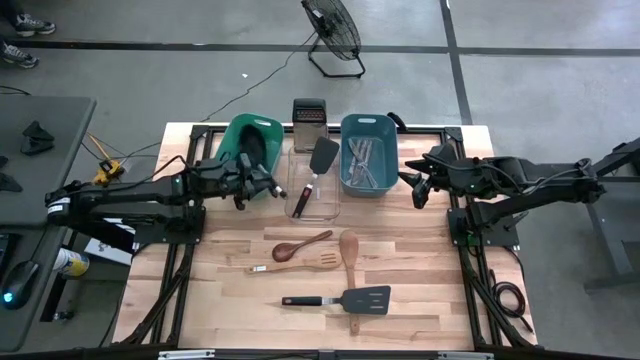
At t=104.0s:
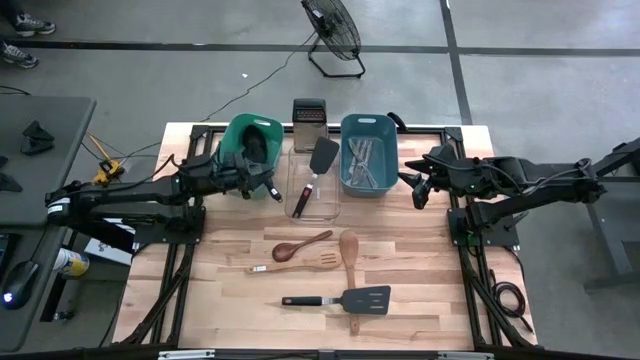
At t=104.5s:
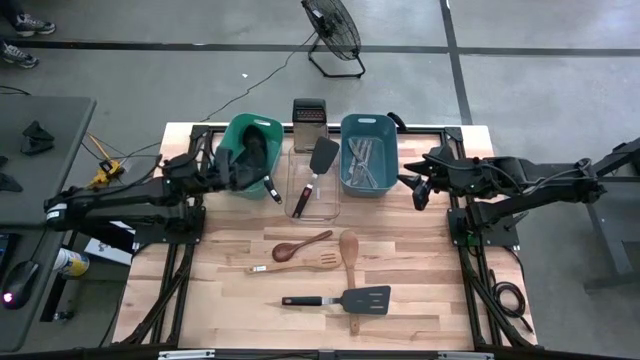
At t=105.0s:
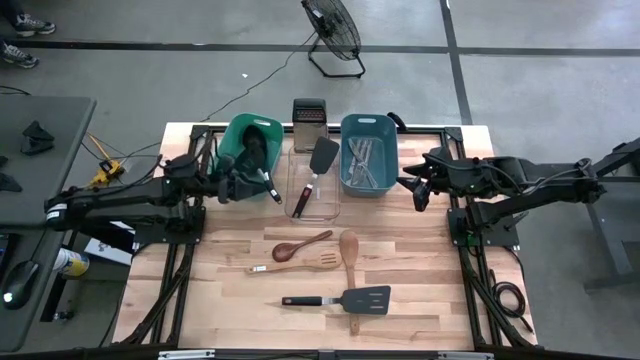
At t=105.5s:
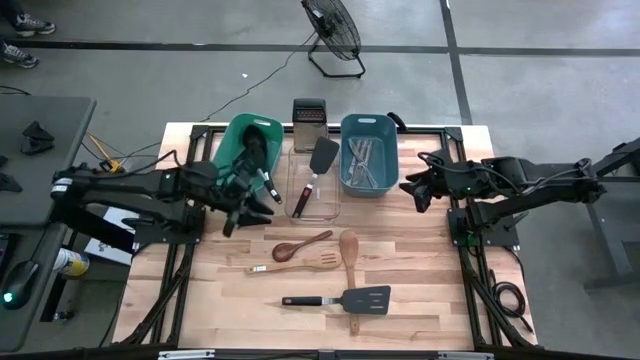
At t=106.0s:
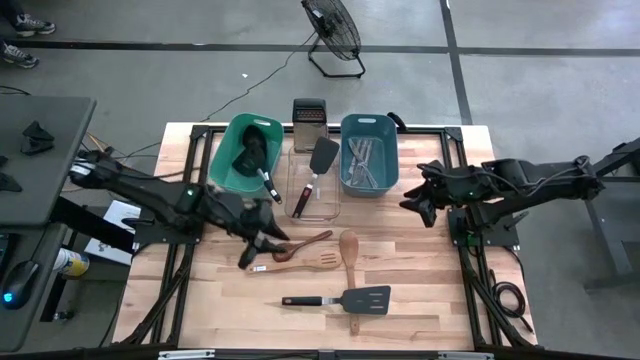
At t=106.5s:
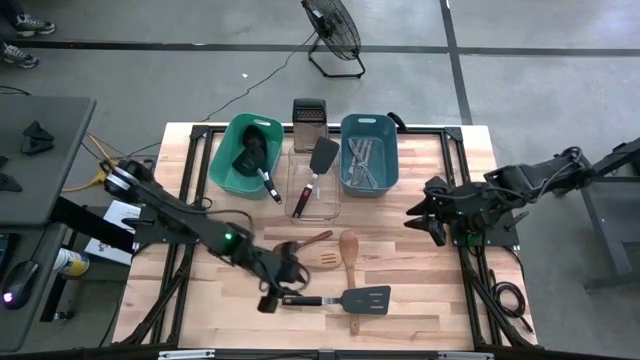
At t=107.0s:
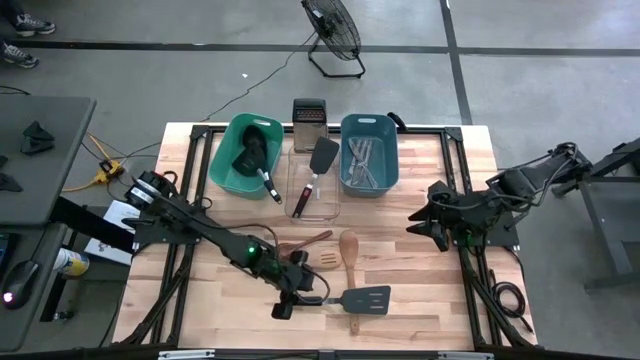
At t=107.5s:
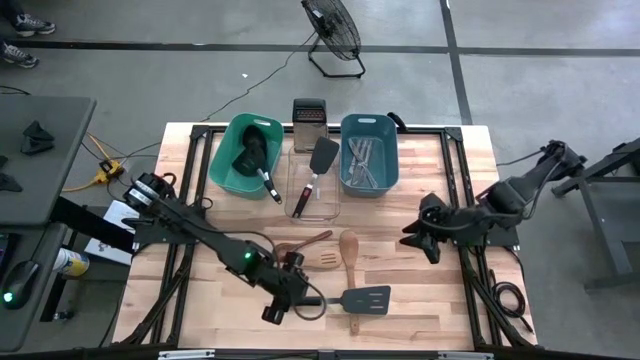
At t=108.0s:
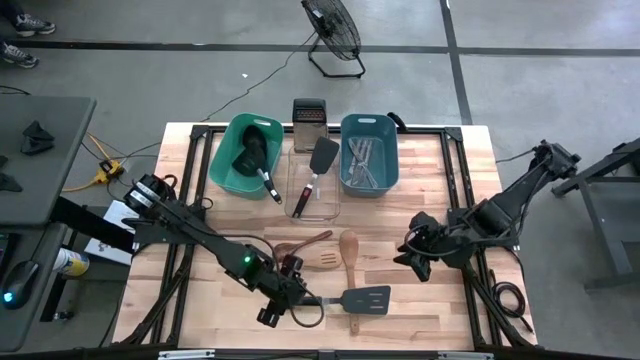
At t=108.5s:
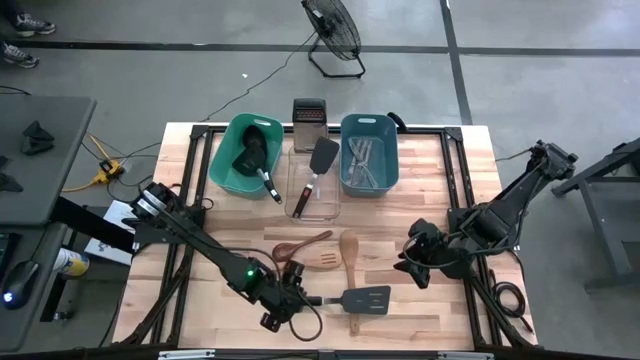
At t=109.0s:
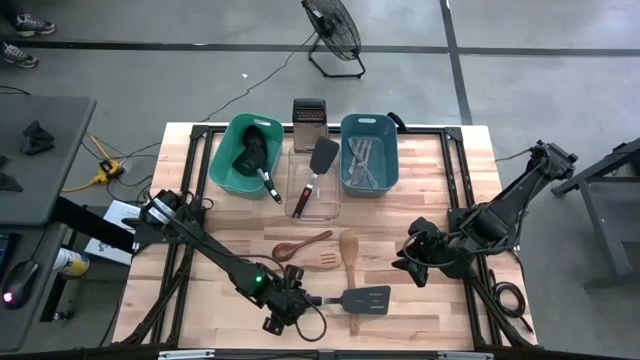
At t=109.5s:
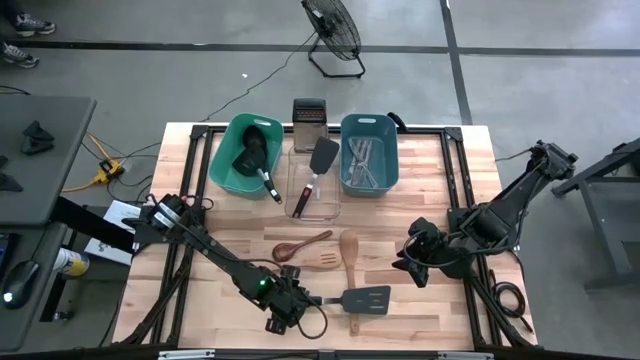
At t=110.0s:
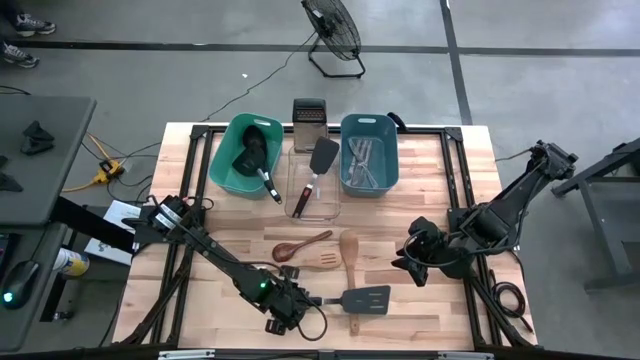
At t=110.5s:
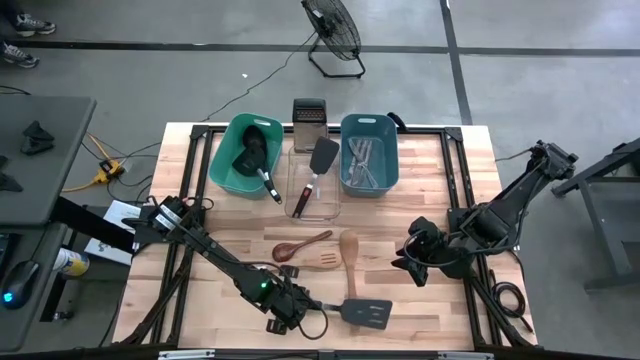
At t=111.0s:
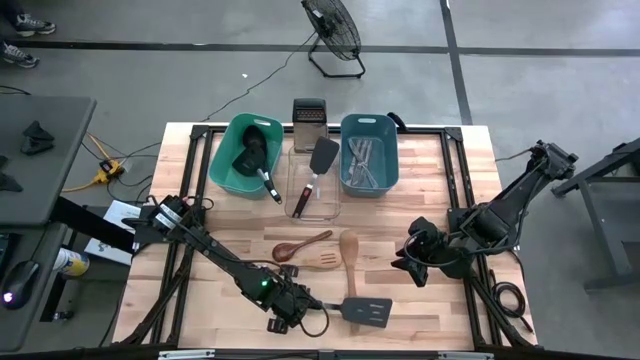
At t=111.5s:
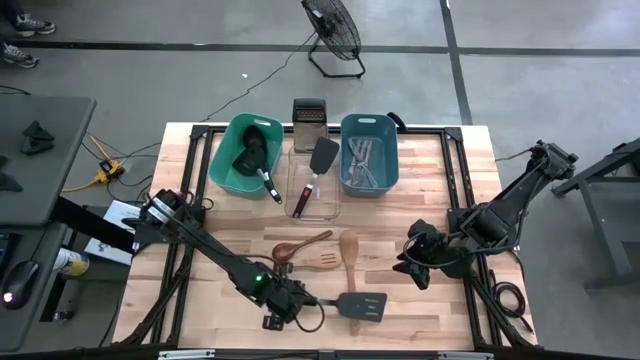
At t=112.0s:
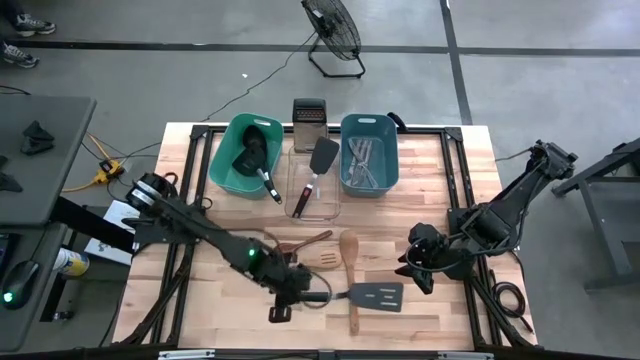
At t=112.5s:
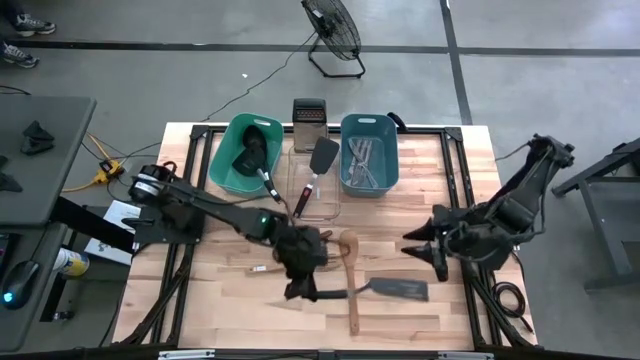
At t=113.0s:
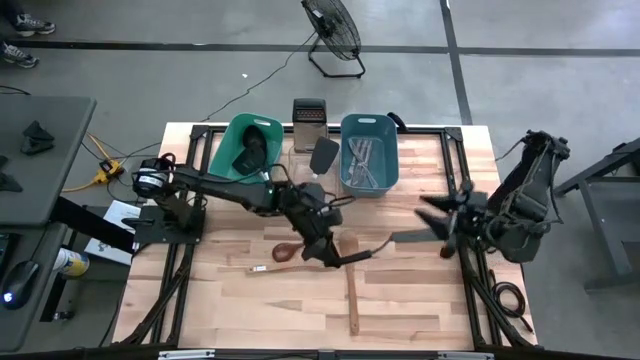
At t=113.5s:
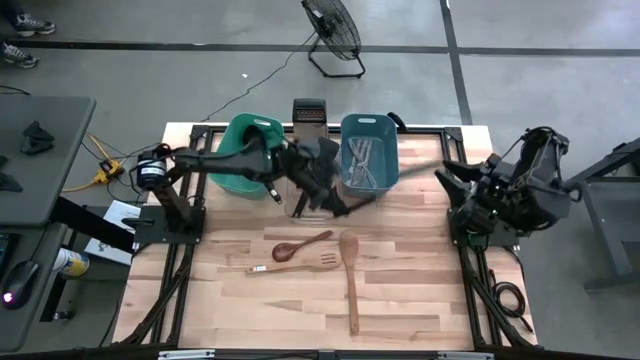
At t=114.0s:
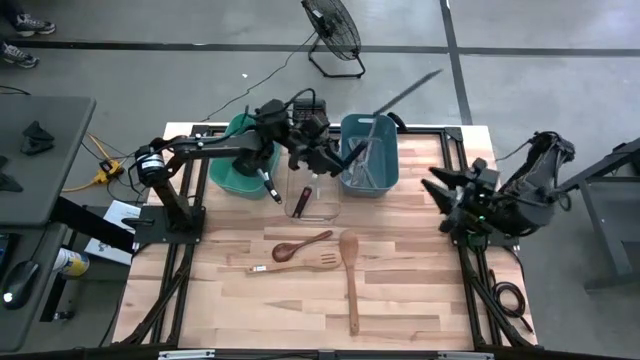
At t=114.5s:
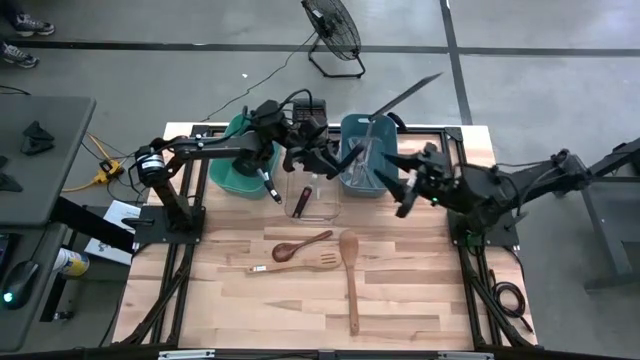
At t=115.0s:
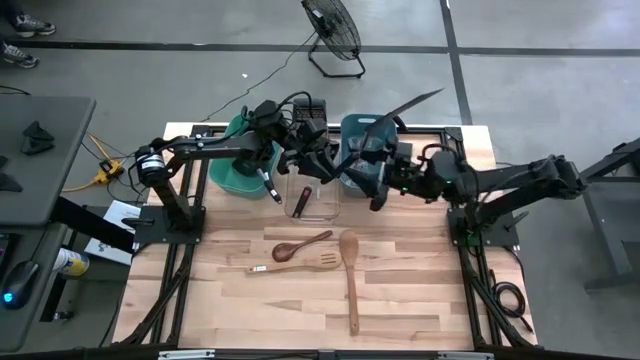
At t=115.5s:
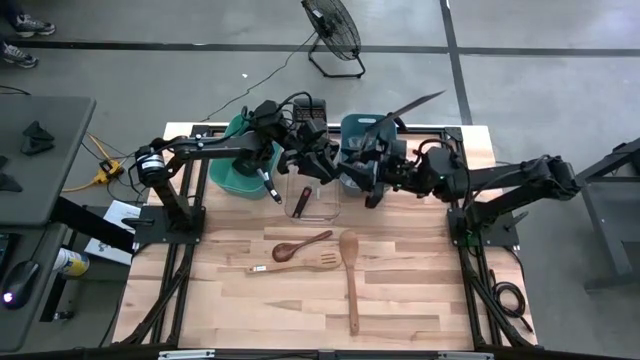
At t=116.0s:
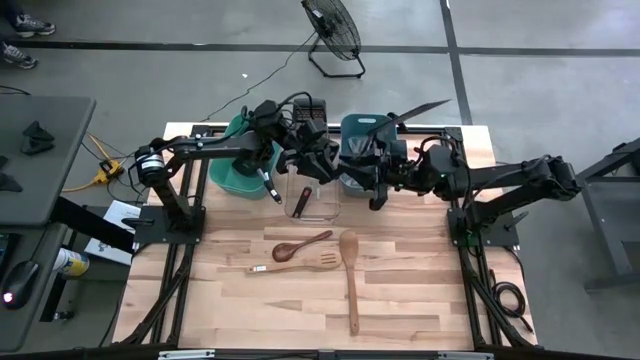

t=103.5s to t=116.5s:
Task: Pick & Place Kitchen Items
Put the slotted spatula into the transparent bin

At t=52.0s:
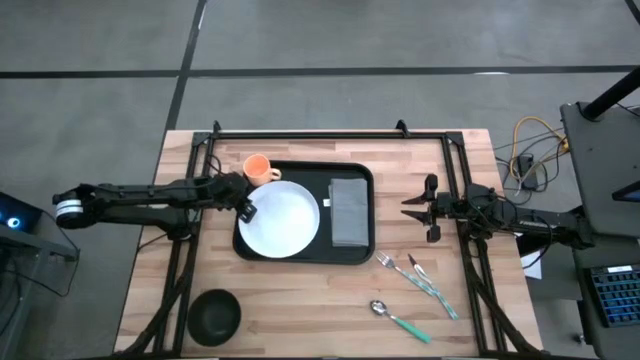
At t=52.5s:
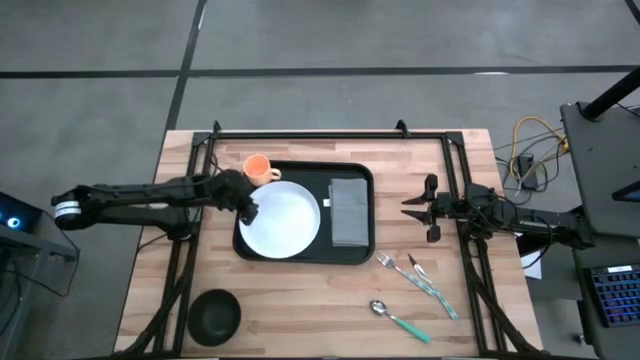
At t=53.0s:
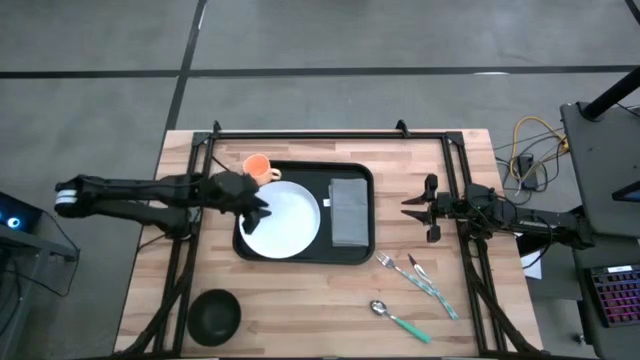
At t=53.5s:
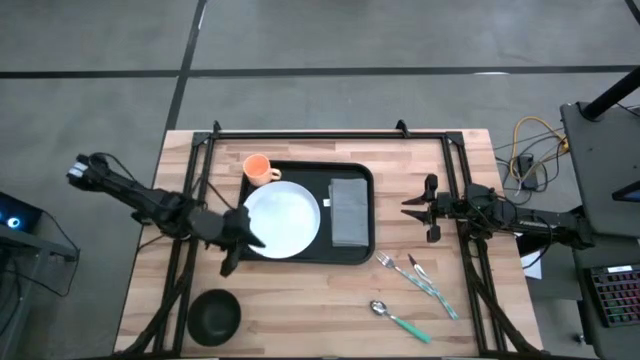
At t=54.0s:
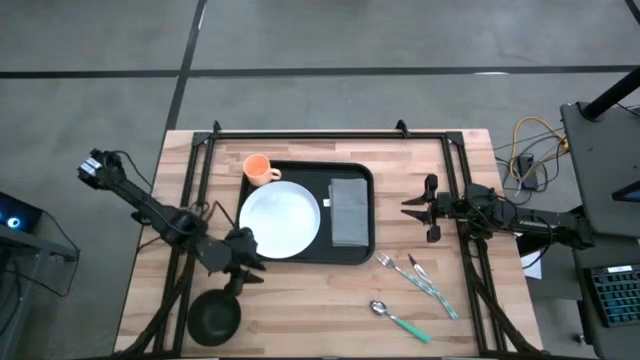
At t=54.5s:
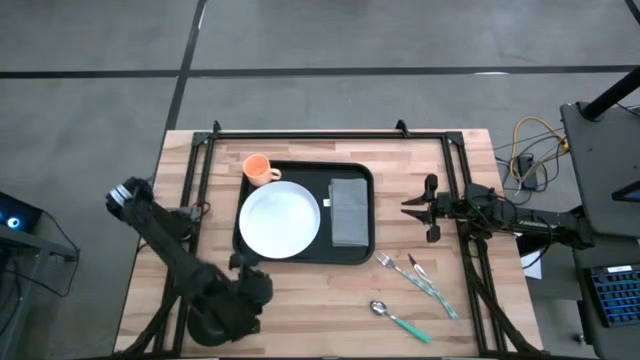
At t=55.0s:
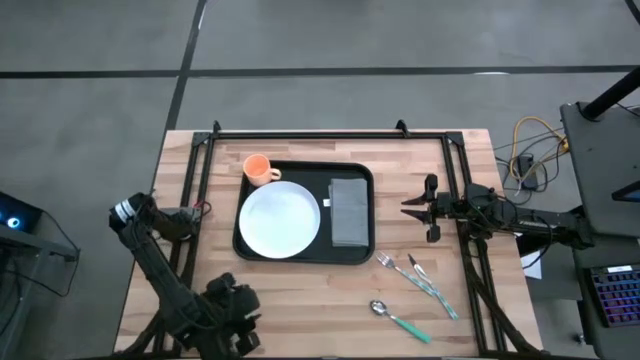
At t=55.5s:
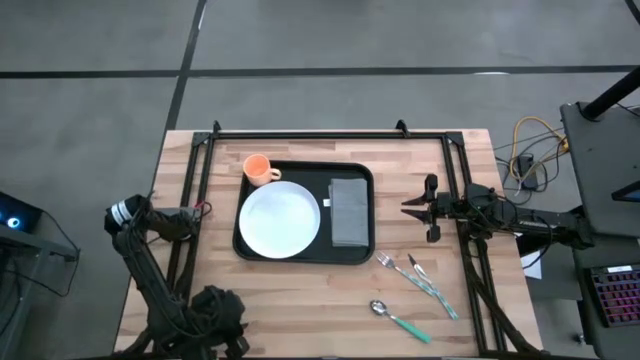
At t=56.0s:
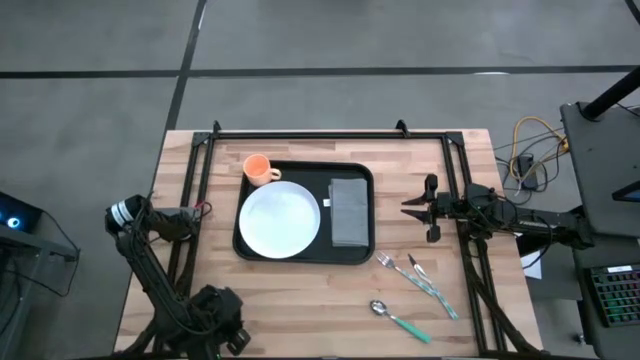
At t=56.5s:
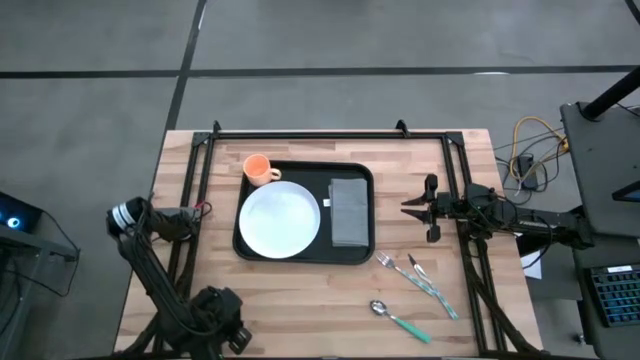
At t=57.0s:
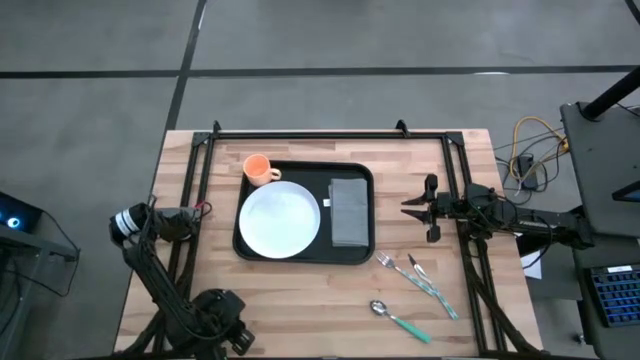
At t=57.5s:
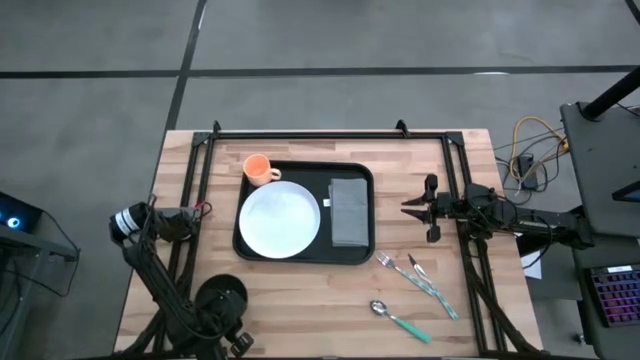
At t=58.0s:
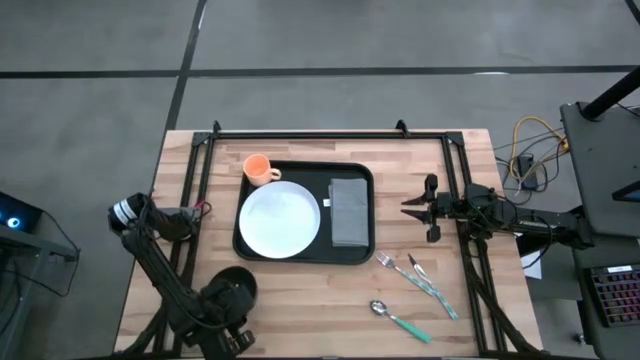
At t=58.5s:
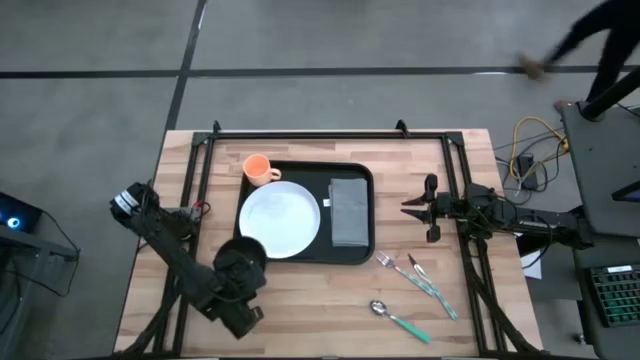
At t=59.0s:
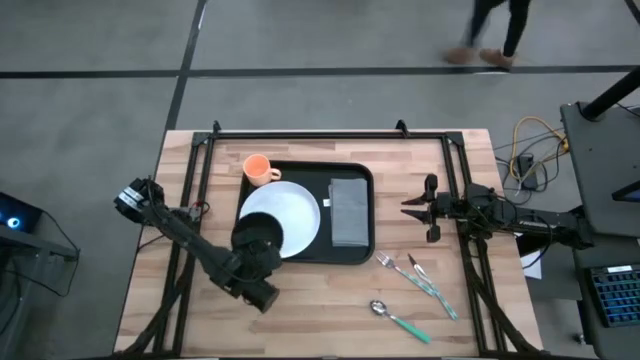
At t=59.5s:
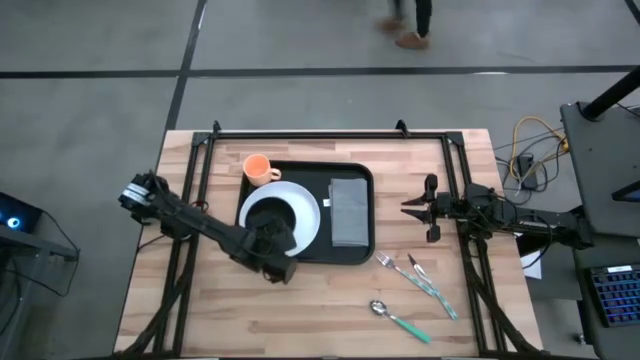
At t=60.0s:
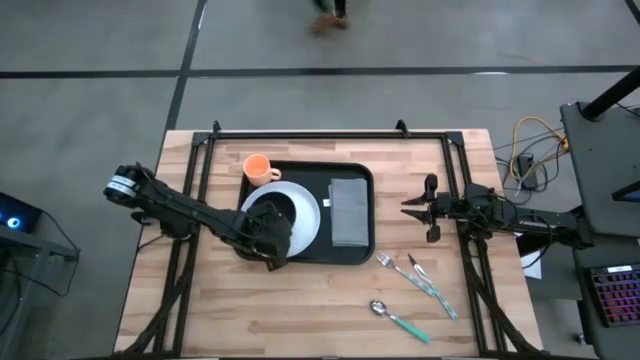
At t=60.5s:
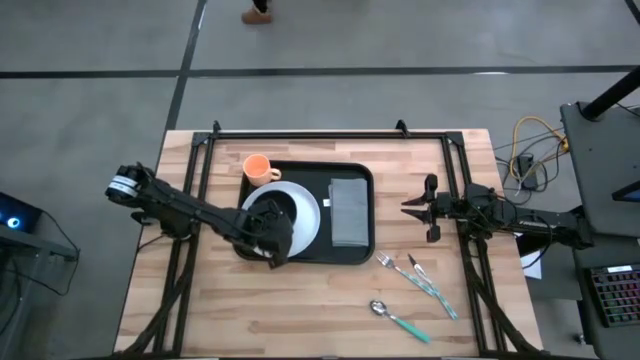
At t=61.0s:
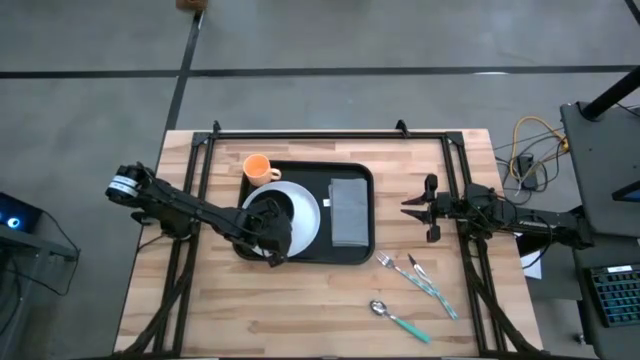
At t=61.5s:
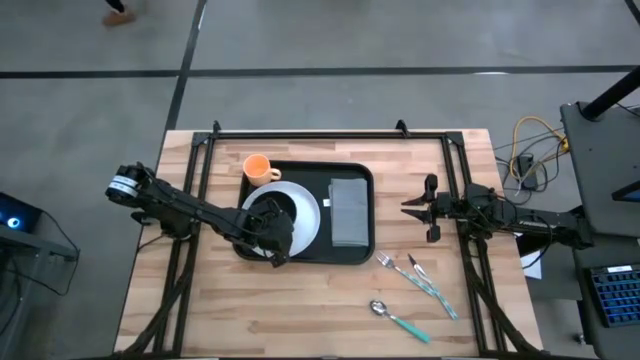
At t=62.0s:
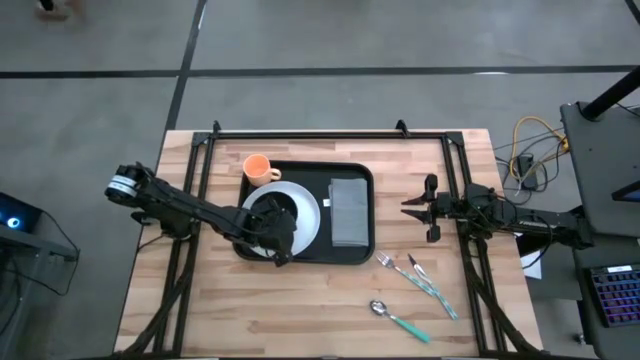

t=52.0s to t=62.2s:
Task: Set up tray
Put the black bowl on the white plate on the black tray
